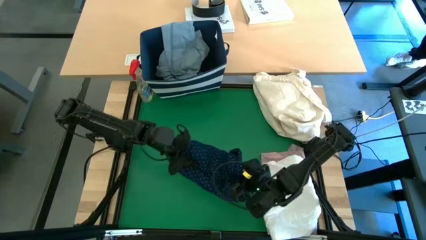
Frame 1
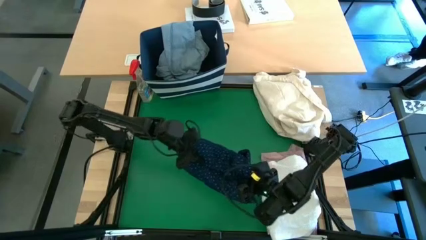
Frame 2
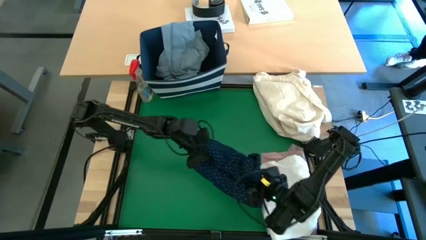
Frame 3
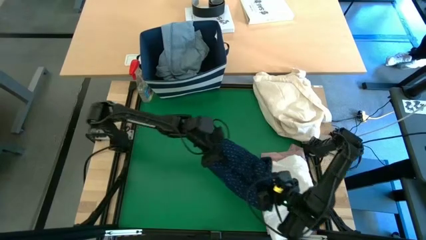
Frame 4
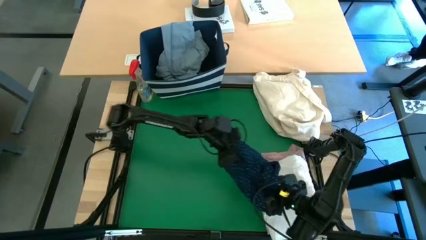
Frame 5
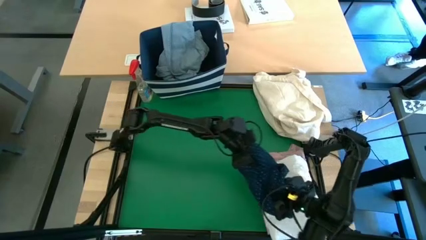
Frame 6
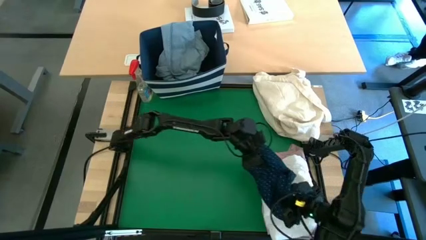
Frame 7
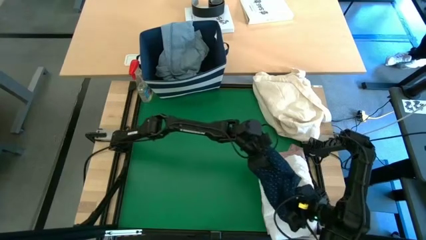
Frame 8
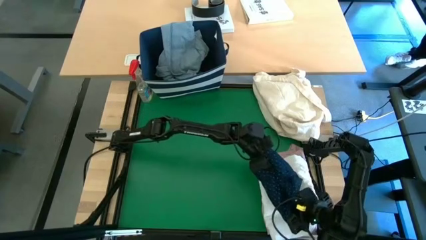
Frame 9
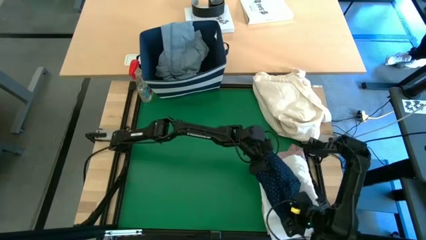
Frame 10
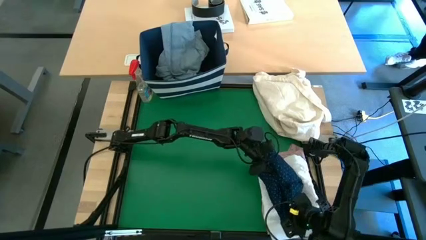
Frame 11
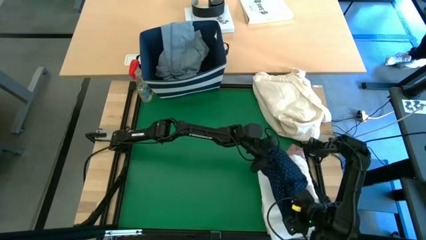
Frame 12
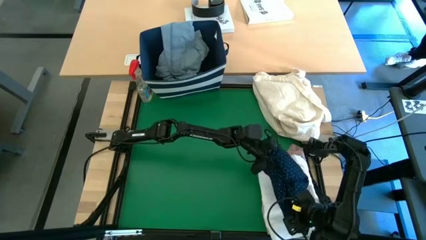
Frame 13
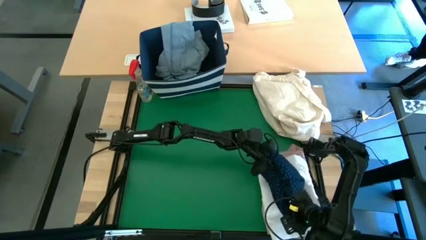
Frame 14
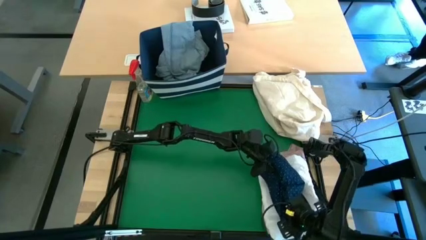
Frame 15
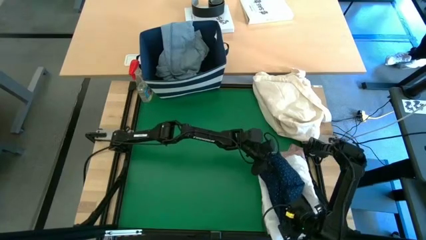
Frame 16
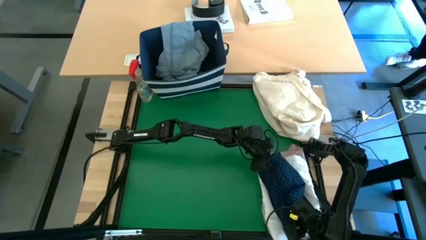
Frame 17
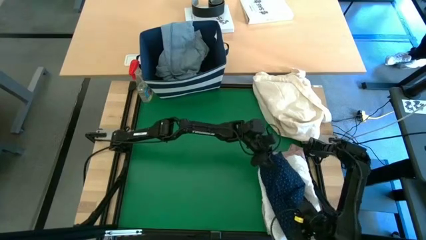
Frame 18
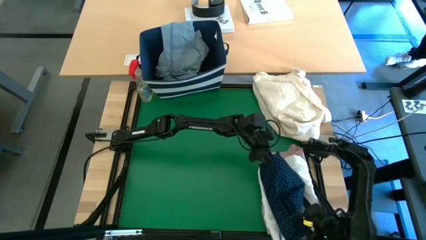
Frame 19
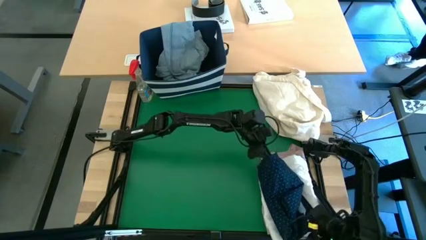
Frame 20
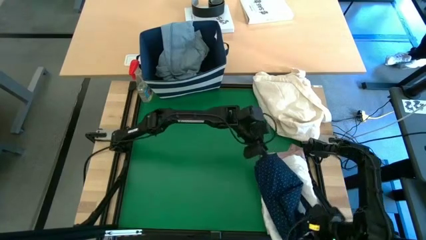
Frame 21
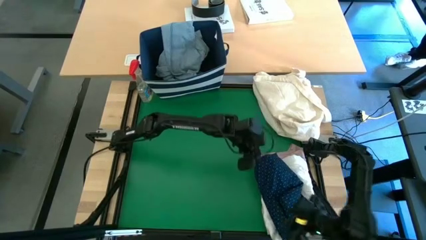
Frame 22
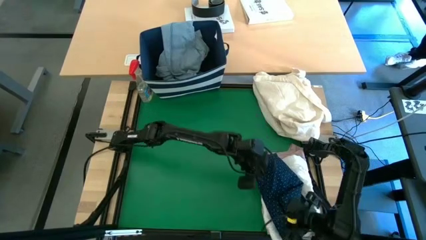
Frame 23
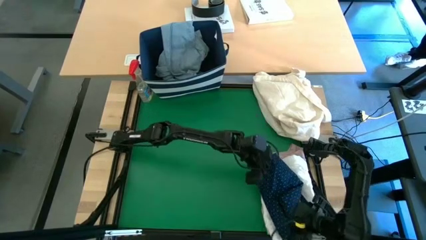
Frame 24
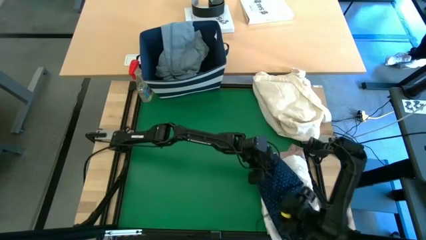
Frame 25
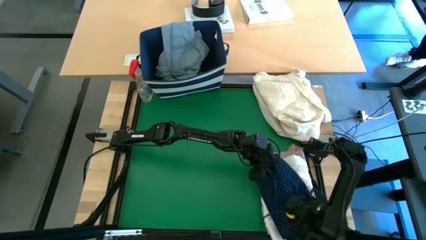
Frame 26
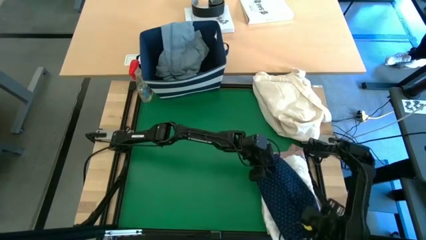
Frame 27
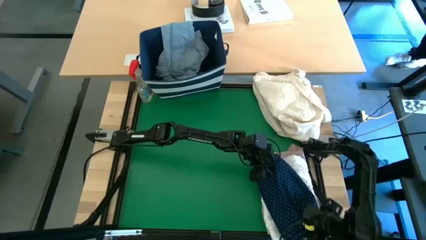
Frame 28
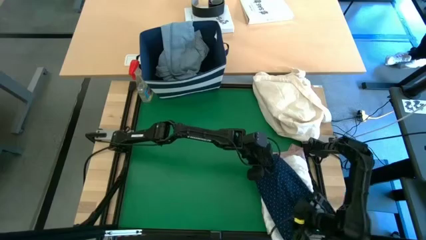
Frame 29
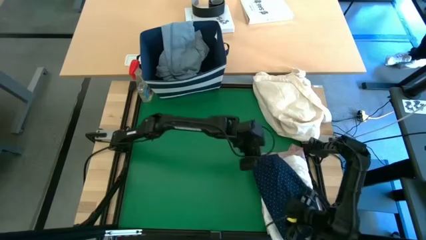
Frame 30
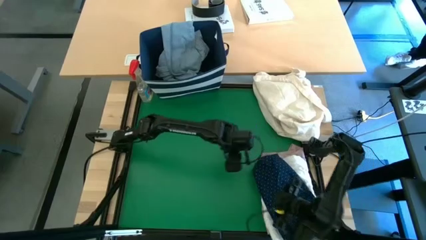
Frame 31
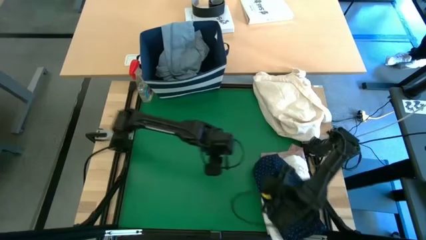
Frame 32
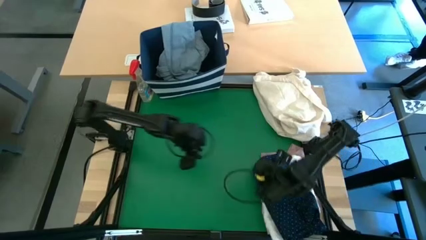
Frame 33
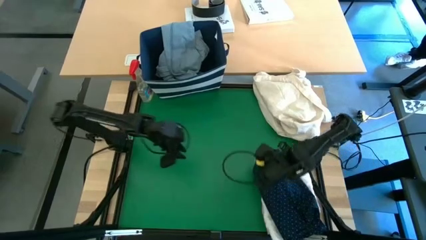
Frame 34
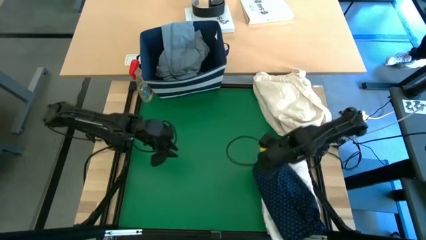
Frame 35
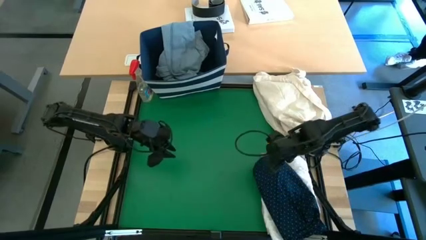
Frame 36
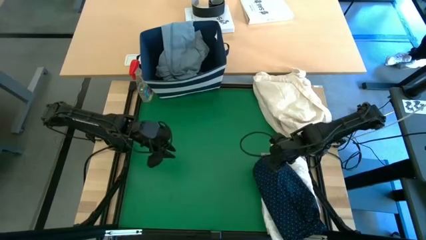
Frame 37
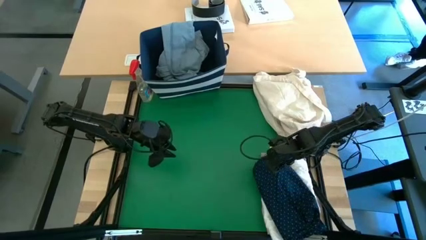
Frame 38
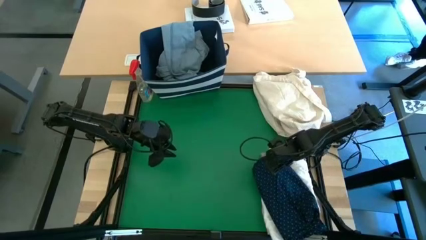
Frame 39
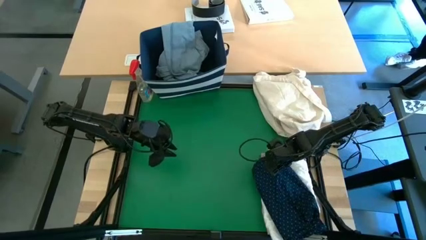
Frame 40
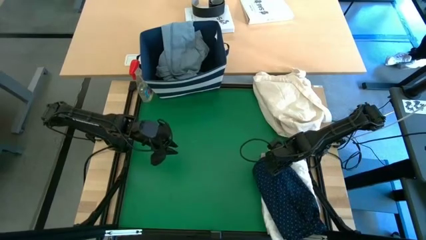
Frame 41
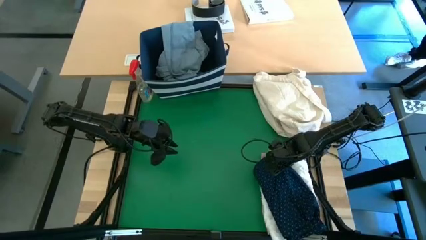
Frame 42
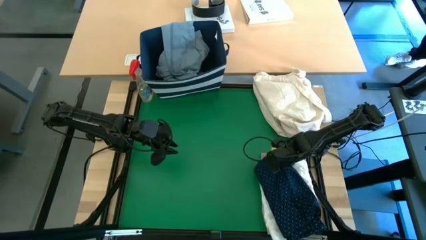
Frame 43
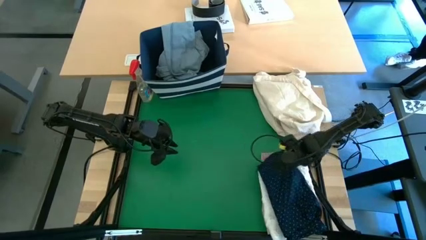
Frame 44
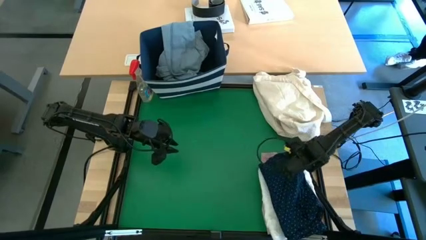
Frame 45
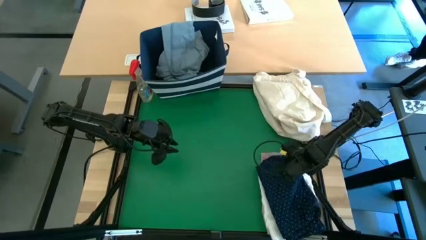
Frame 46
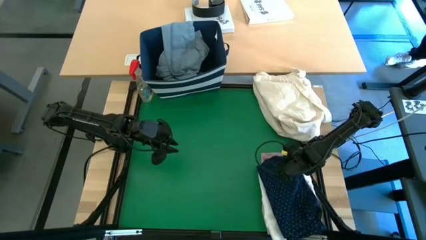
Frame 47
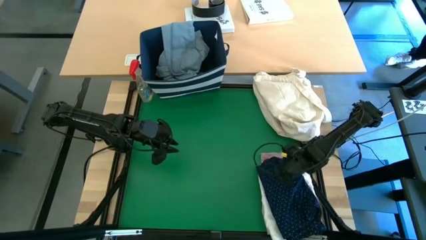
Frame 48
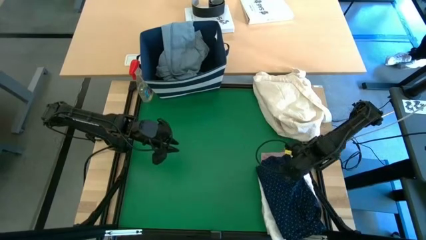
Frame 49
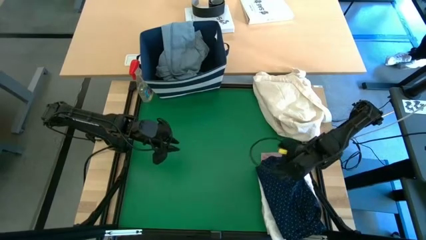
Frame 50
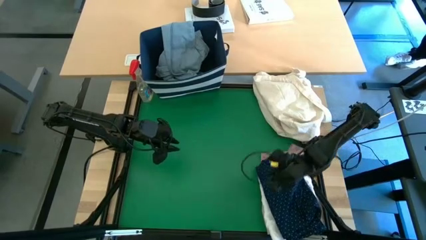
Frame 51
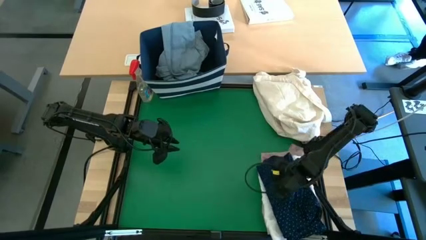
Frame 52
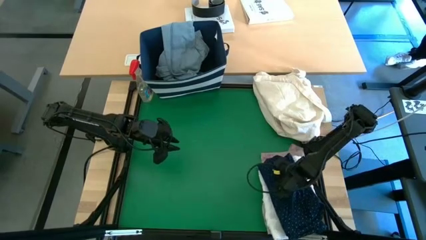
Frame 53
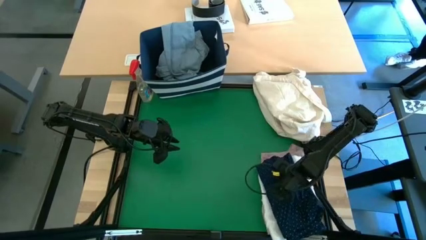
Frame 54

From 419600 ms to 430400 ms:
Task: Fold laundry
Stack the blue polo on top of the white polo

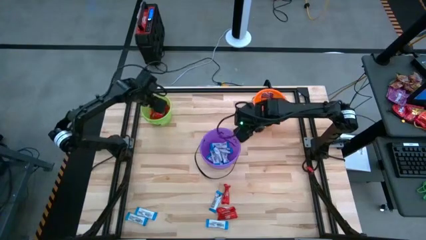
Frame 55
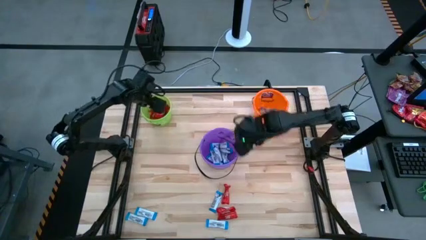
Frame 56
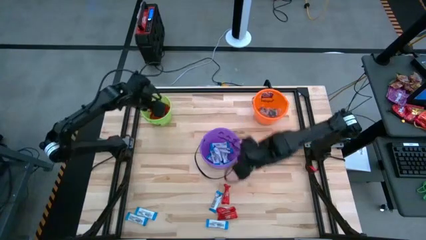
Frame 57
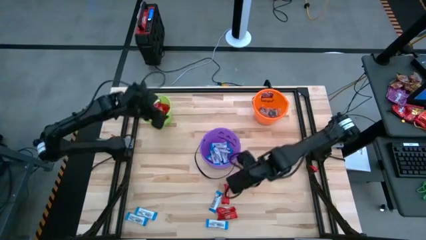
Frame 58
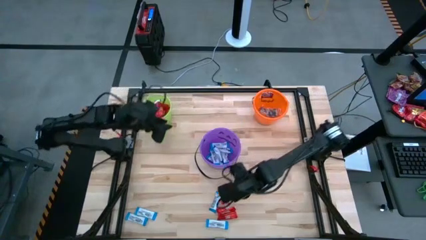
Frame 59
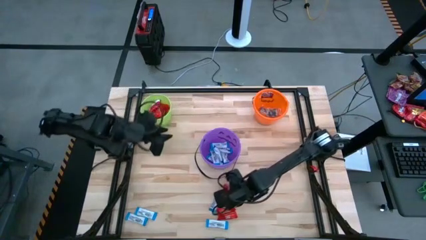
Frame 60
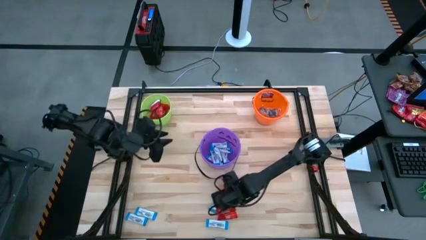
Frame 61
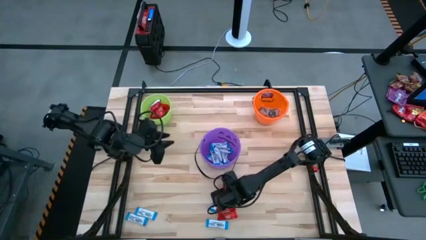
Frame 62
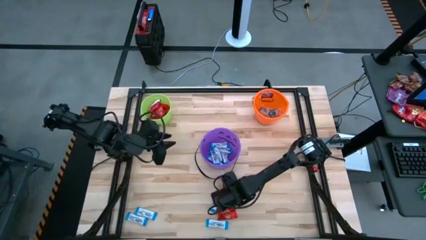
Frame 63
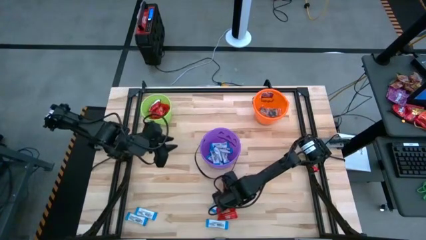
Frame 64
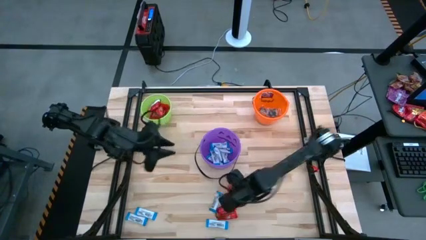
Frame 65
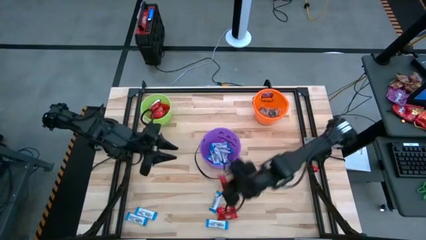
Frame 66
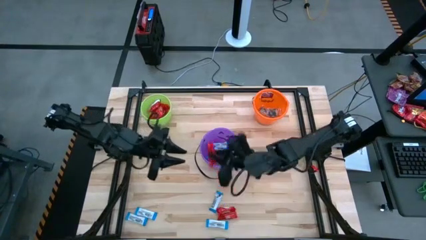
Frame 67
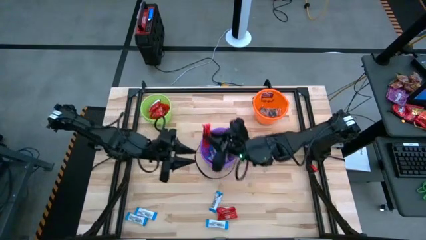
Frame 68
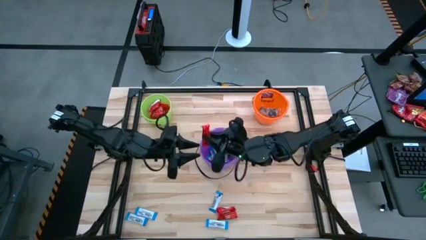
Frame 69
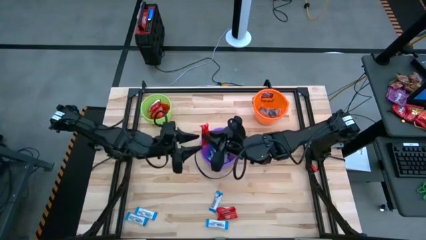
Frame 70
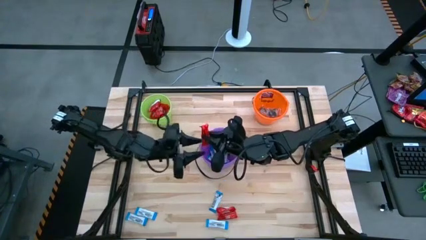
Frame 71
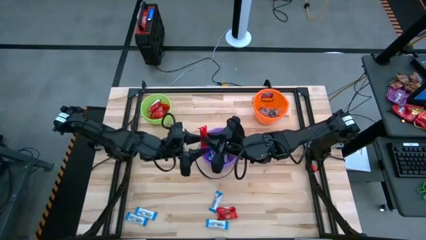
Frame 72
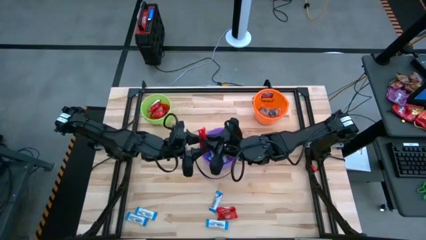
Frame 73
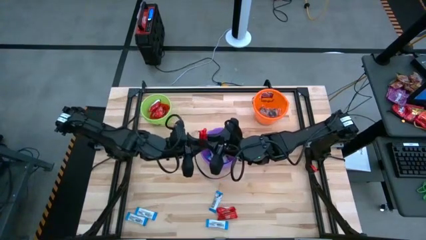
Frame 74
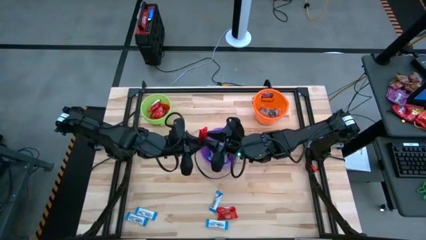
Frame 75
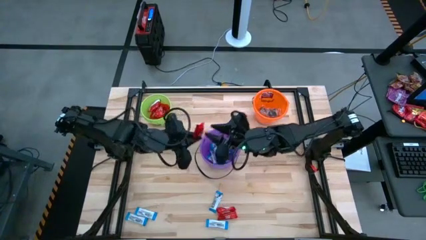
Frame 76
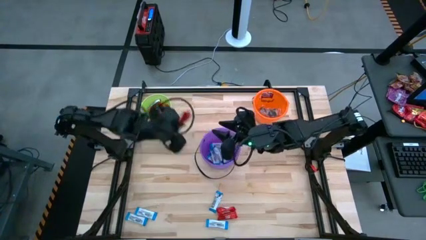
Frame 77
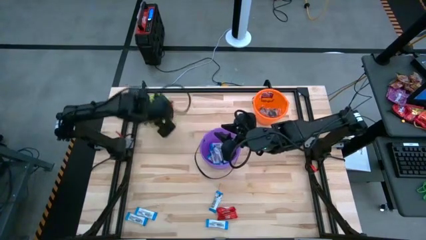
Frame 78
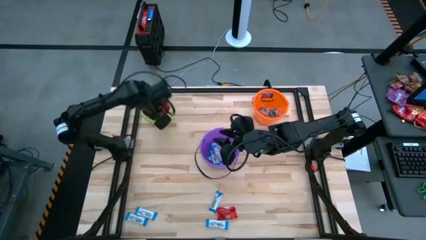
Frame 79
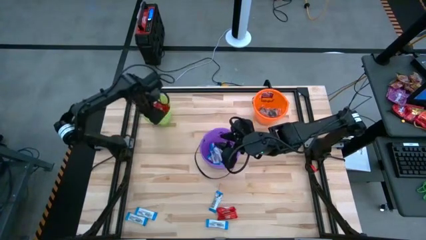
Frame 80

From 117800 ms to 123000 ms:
Task: Sort candy by brand, put in halloween buckets
Put the red chocolate into the green bucket
